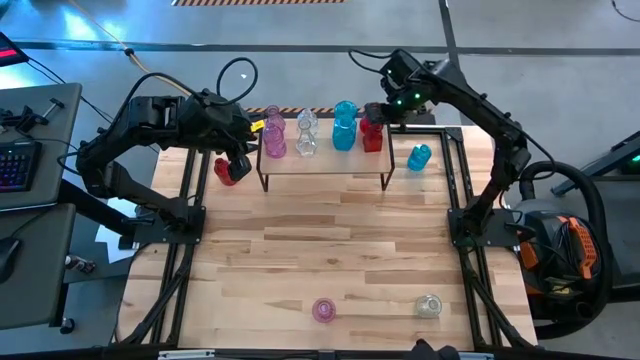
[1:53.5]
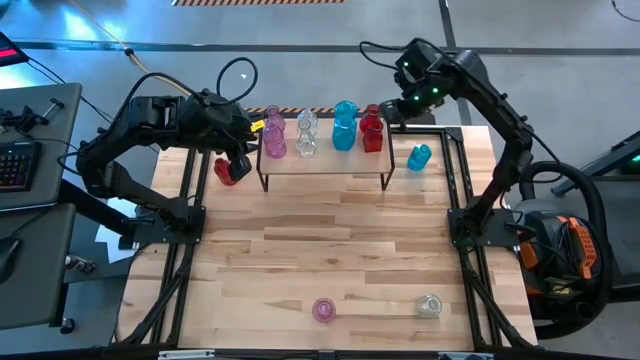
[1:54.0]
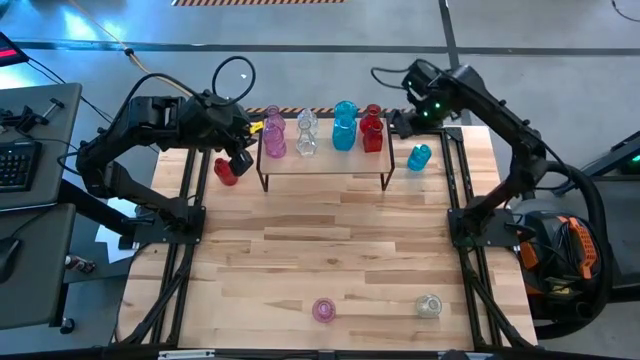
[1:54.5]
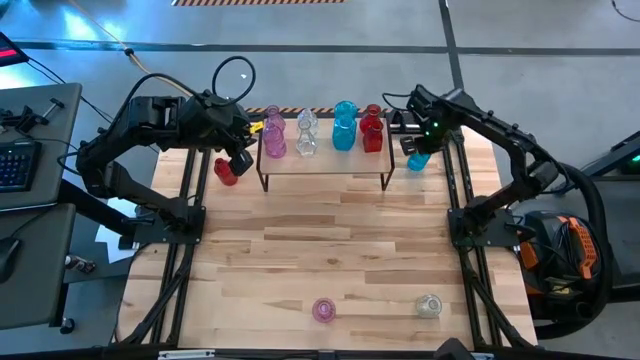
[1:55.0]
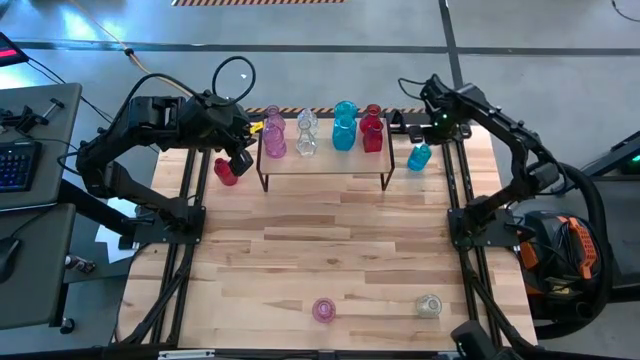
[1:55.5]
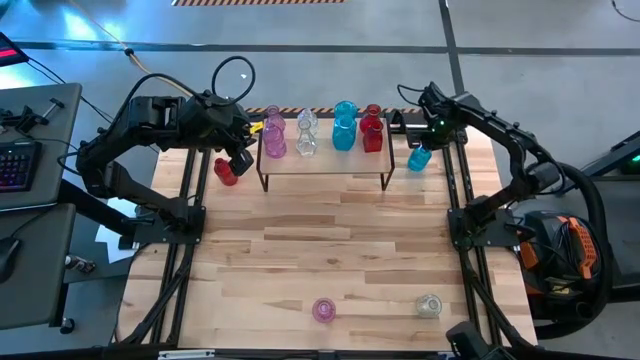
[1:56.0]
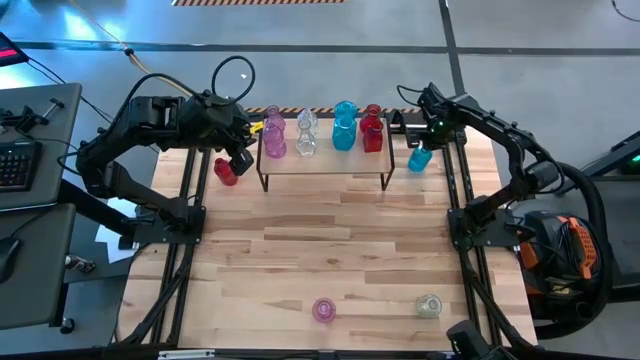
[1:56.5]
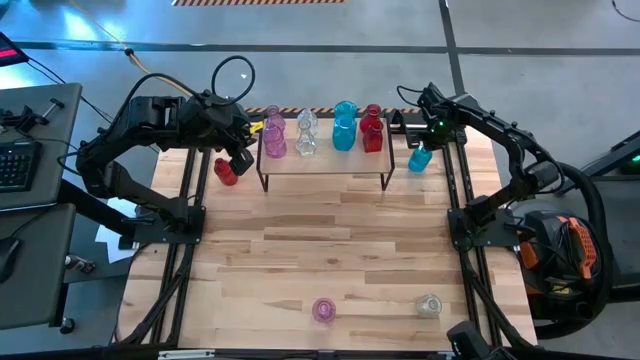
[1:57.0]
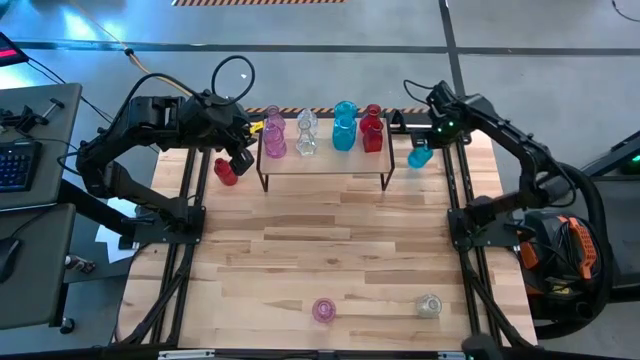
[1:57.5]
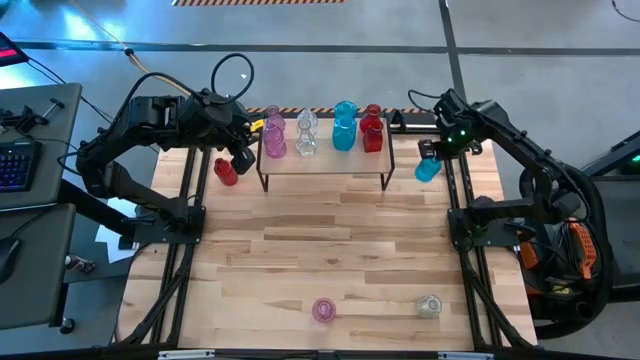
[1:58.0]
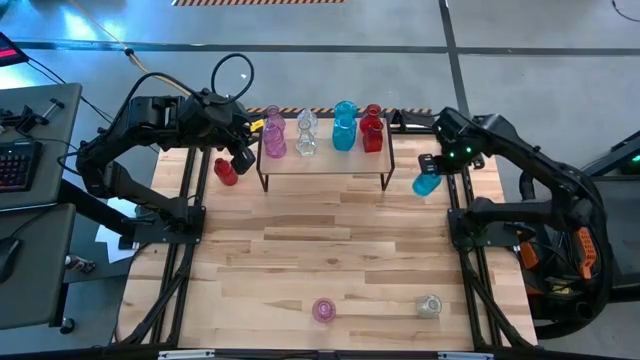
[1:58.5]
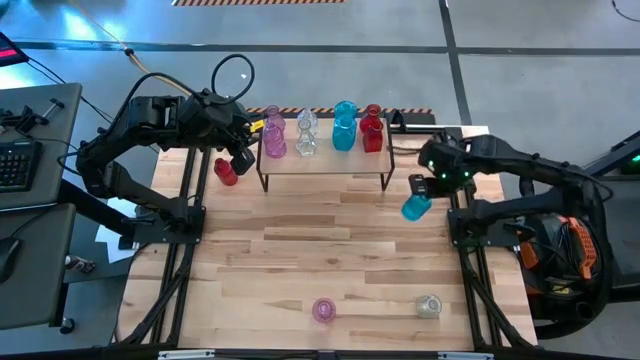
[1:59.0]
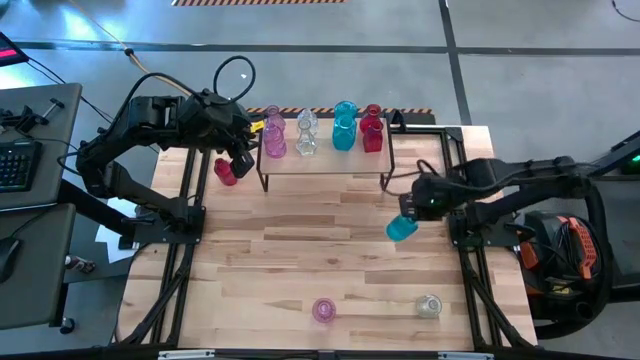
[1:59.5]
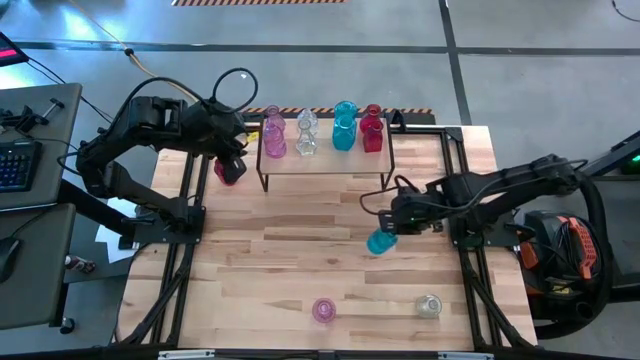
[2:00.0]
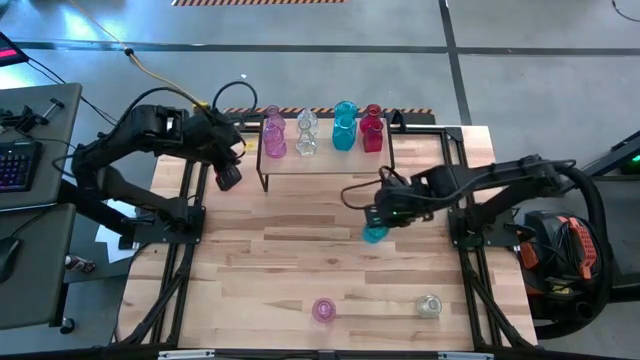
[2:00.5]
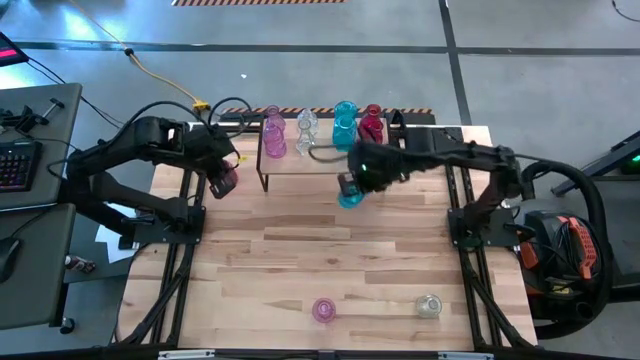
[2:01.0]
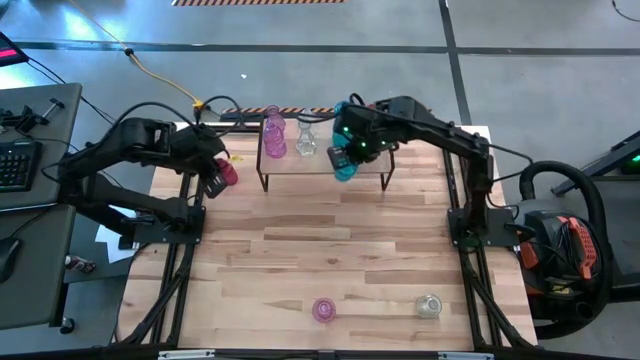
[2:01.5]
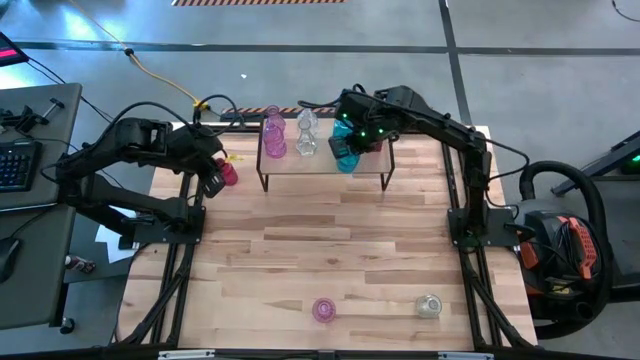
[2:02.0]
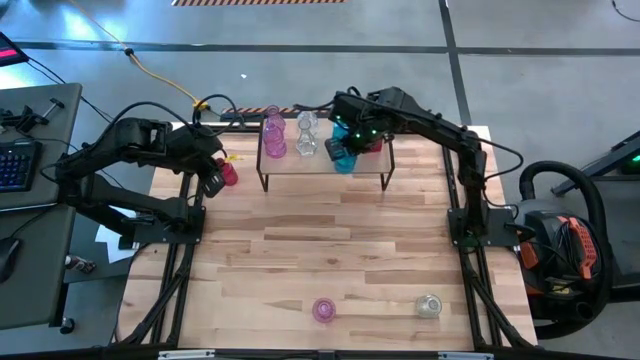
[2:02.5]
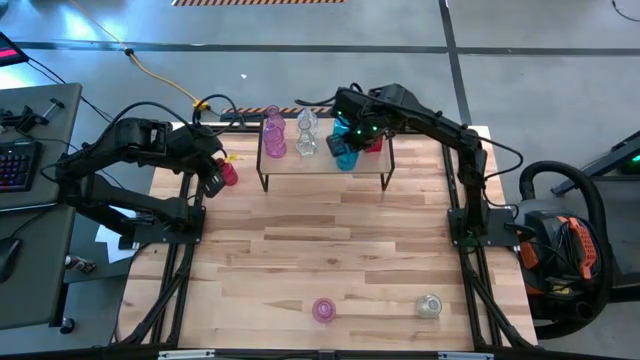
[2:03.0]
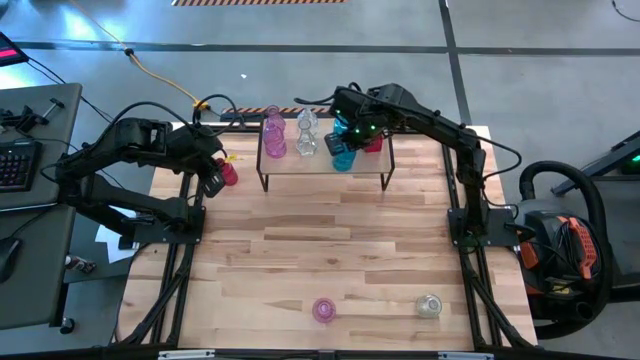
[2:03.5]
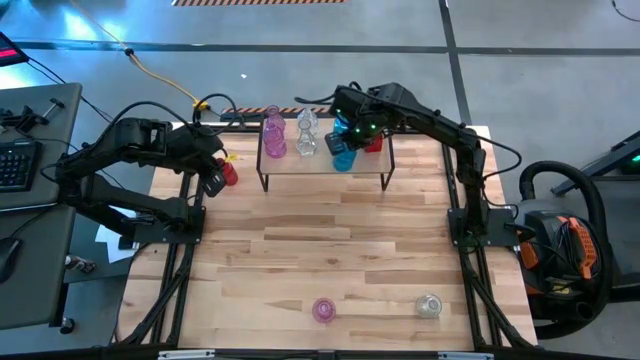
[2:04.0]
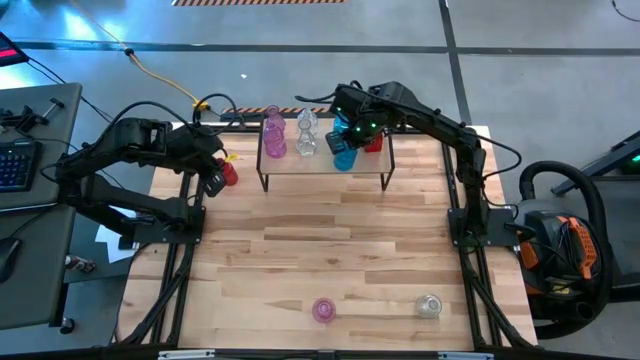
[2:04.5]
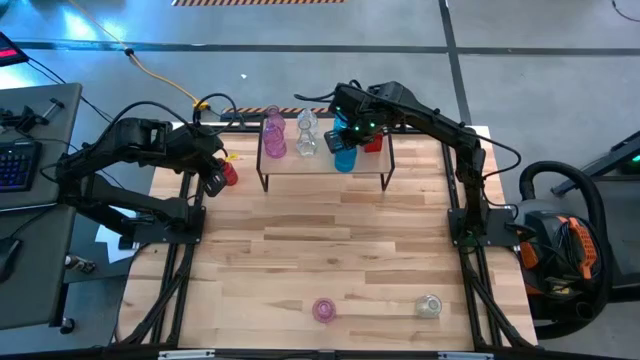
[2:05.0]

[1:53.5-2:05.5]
Task: sort vases onto shelf
Put the blue vase on the shelf aligned with the other blue vases

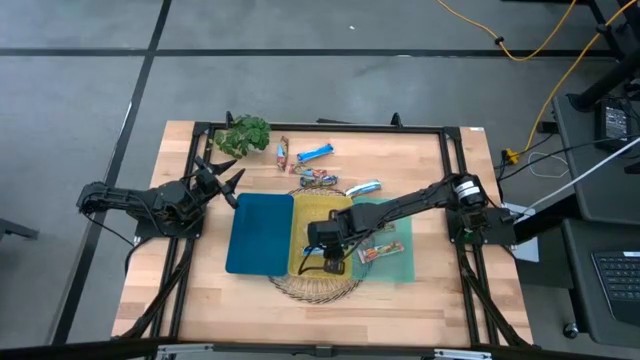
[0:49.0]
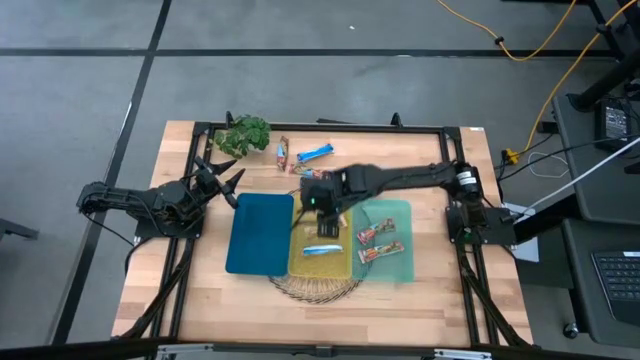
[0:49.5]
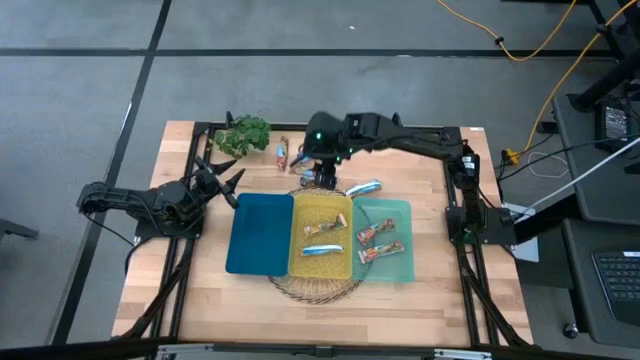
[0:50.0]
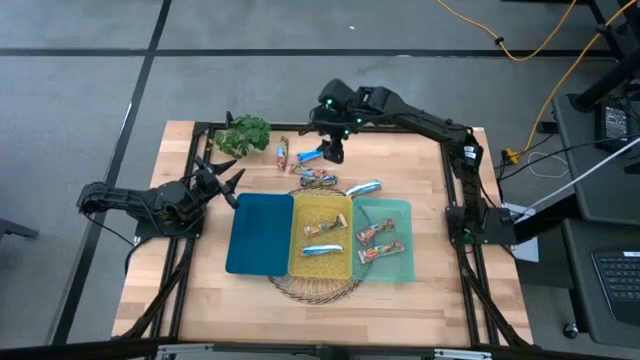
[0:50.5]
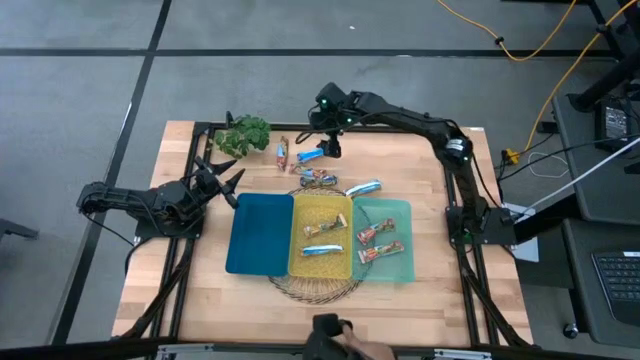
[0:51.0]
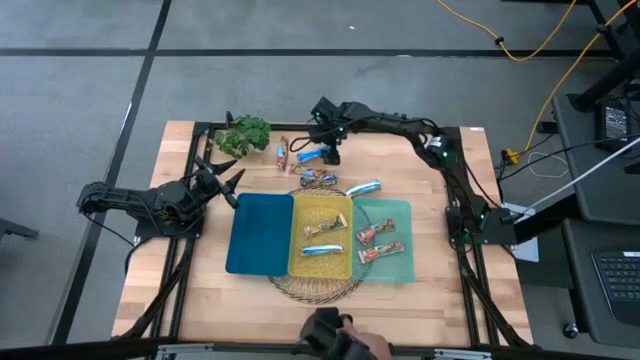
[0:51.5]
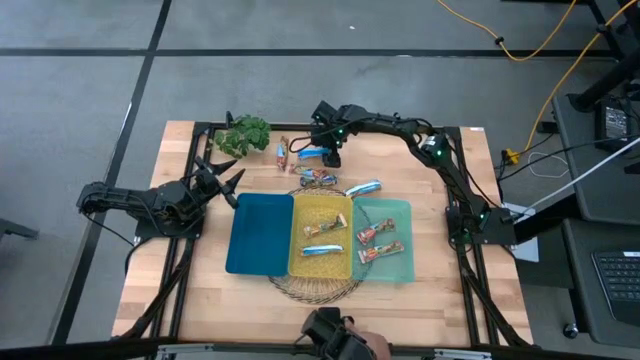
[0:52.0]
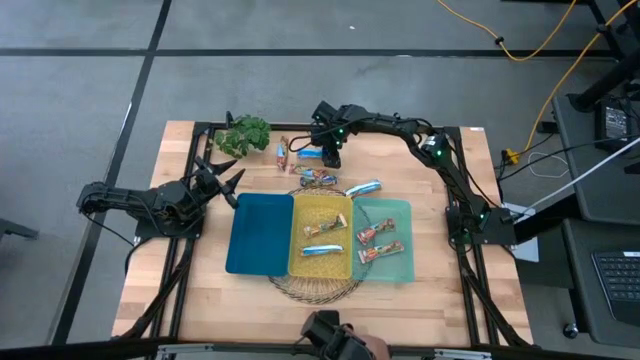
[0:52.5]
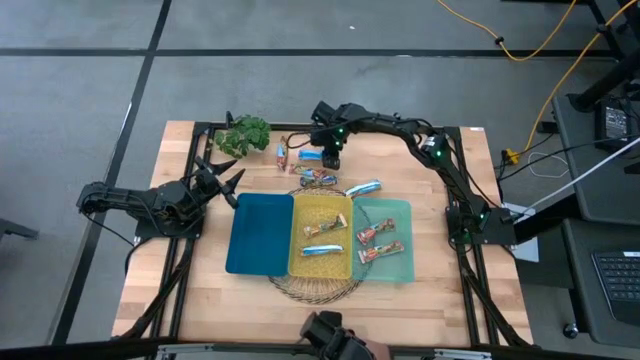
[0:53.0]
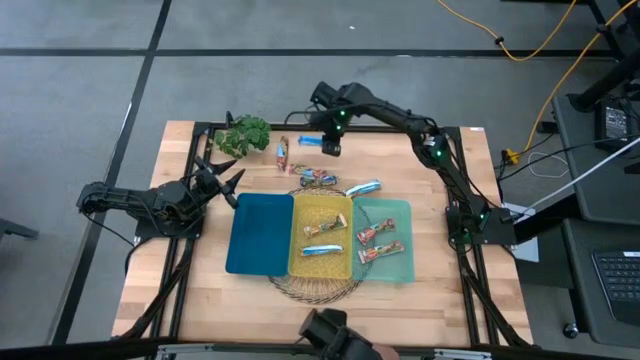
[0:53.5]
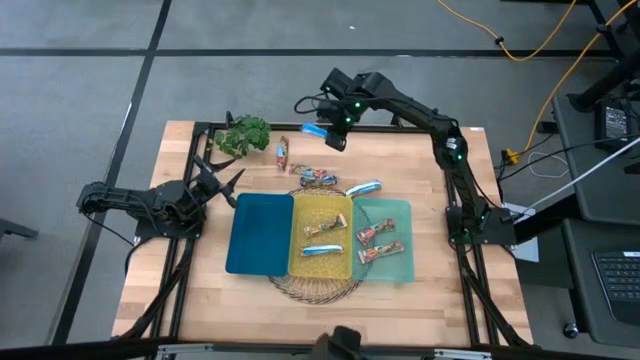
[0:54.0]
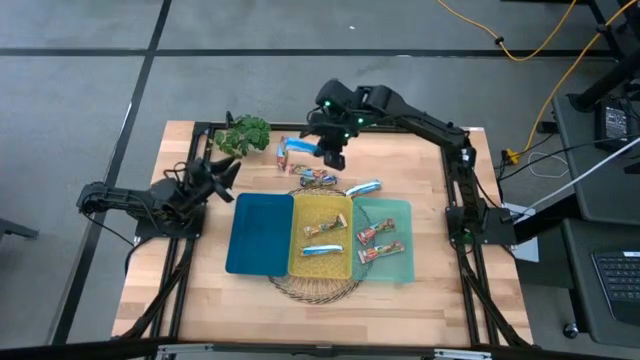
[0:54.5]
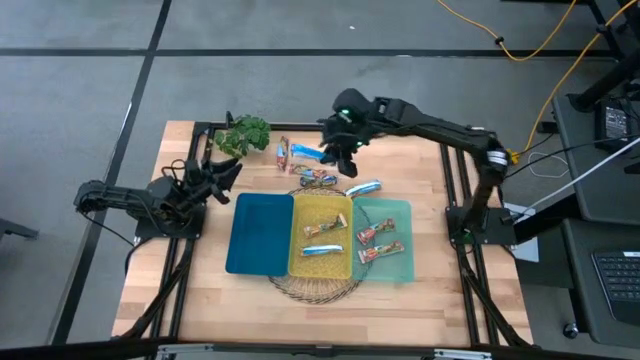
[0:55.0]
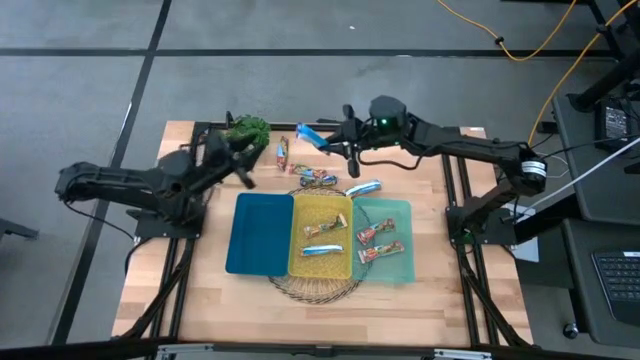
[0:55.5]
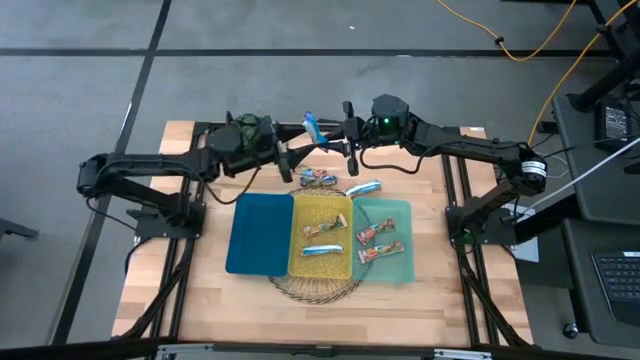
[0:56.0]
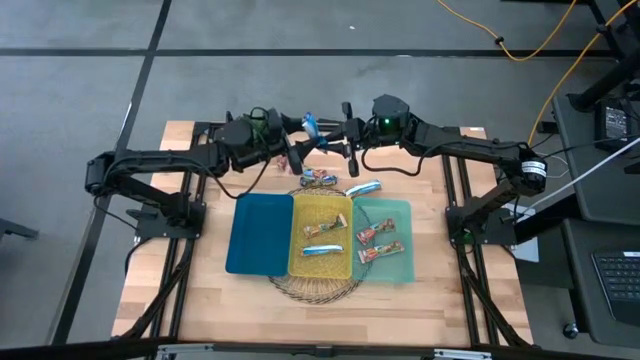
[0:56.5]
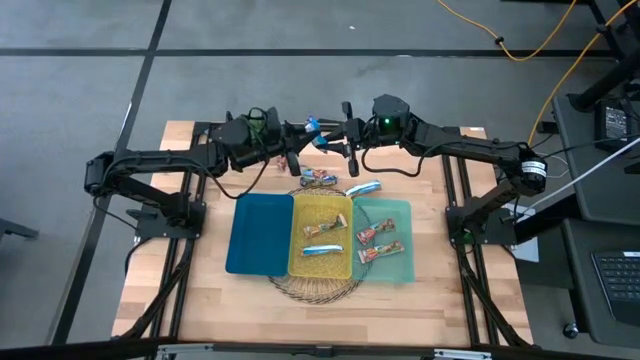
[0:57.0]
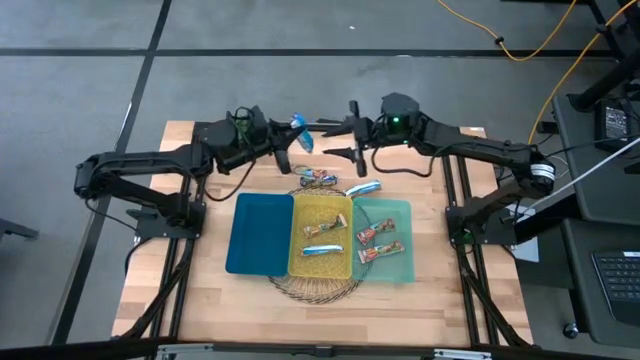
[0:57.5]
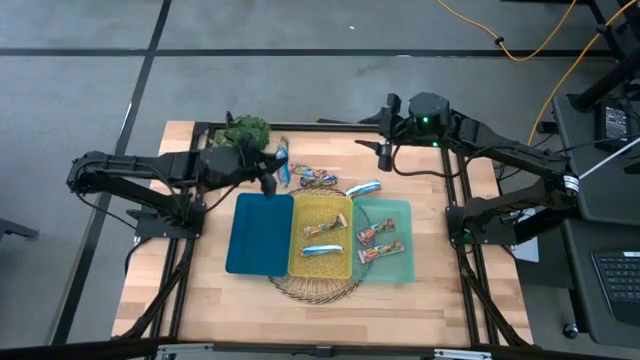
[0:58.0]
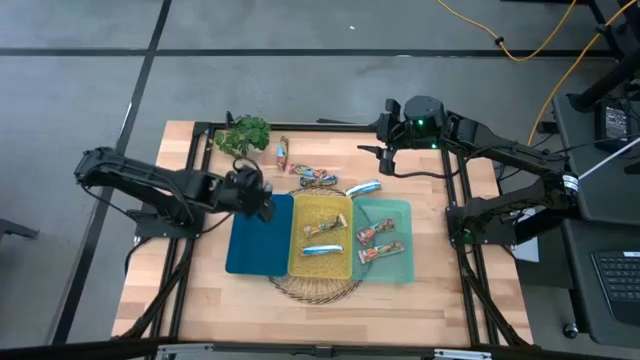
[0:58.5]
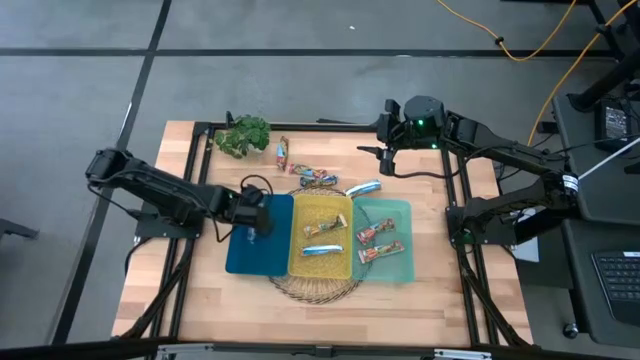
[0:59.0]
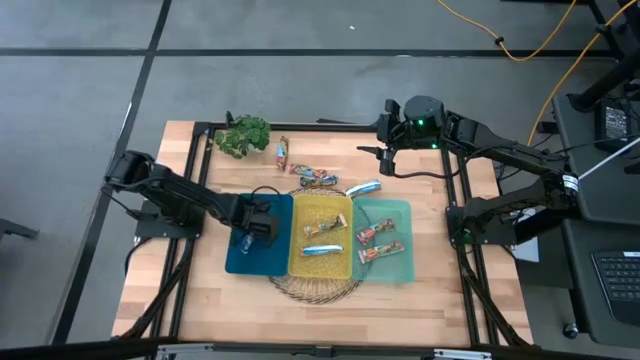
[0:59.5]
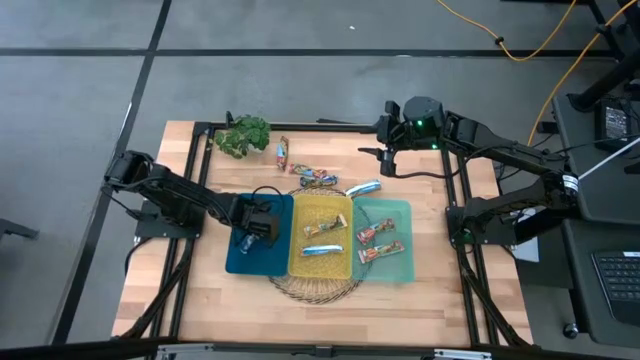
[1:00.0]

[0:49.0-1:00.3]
Task: Pick and place Granola Bars by type
Put the blue granola bar into the blue bin
